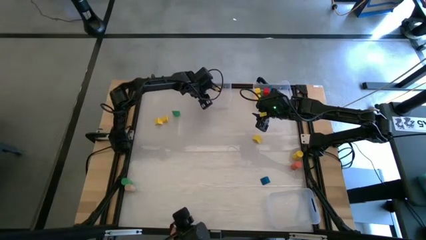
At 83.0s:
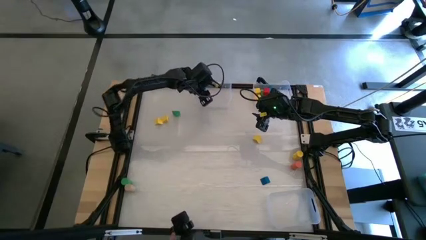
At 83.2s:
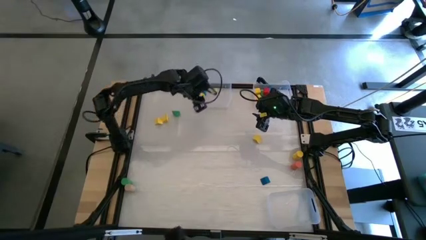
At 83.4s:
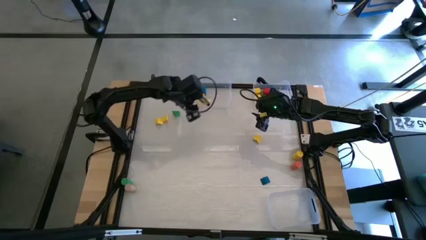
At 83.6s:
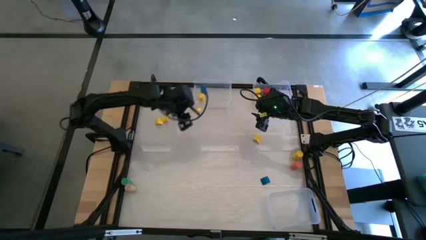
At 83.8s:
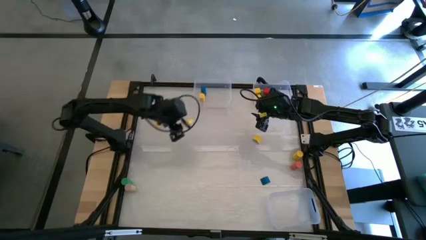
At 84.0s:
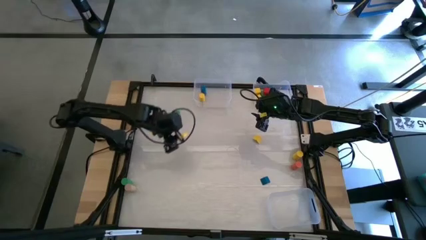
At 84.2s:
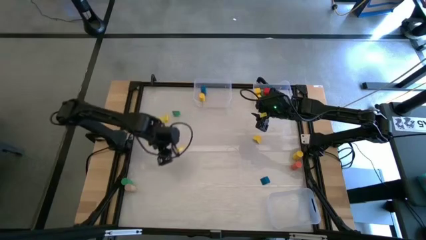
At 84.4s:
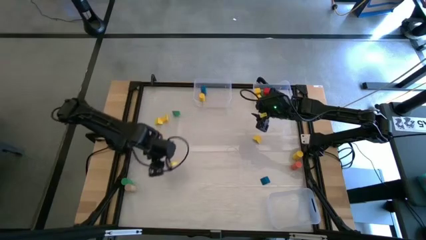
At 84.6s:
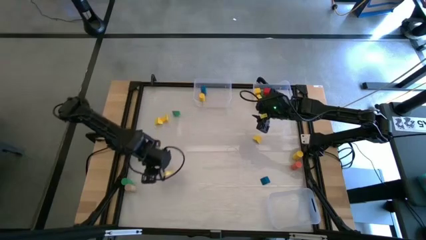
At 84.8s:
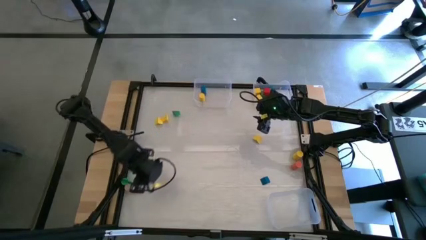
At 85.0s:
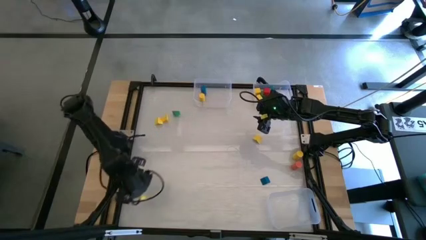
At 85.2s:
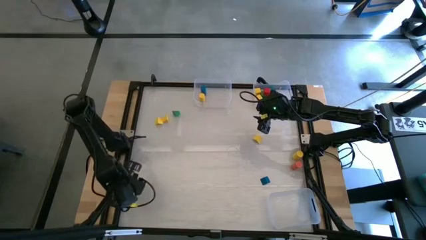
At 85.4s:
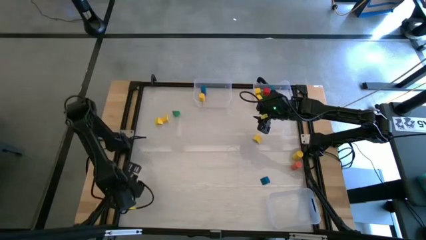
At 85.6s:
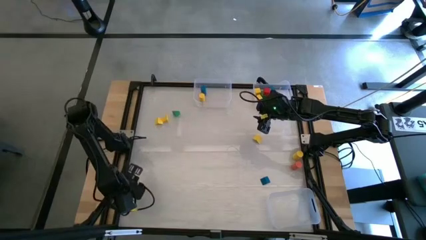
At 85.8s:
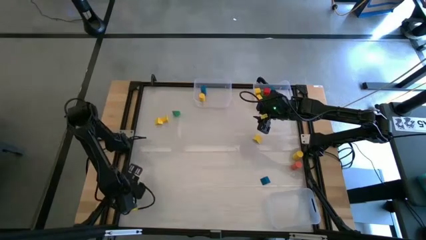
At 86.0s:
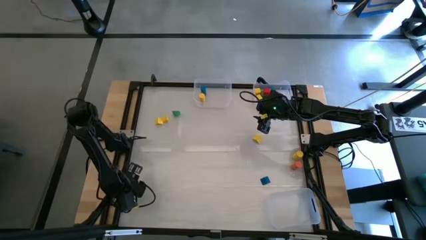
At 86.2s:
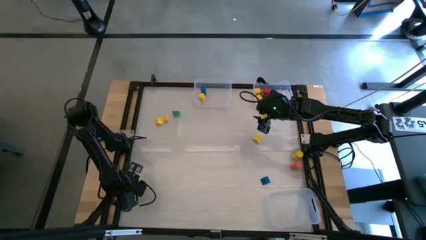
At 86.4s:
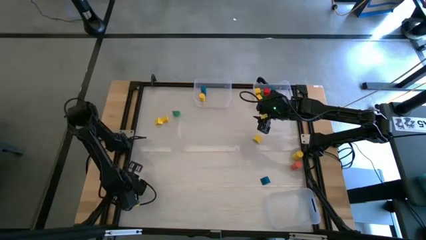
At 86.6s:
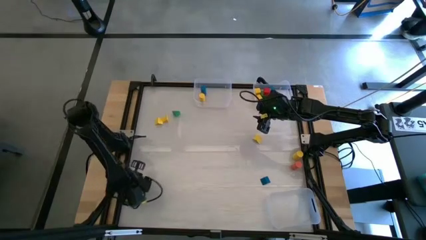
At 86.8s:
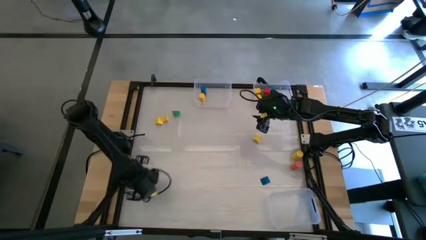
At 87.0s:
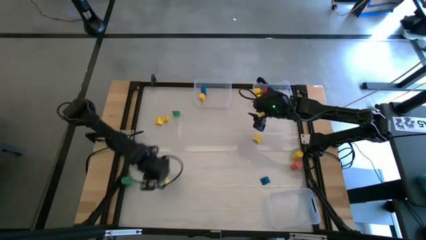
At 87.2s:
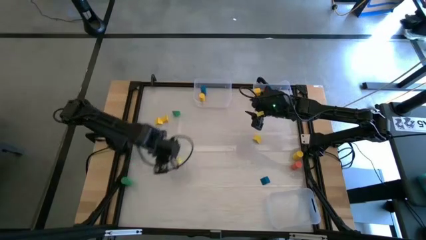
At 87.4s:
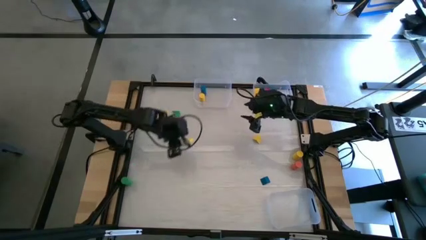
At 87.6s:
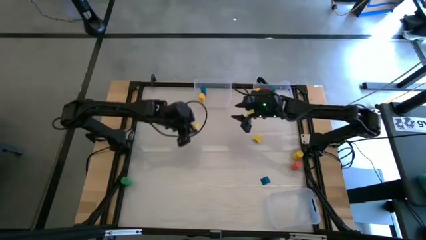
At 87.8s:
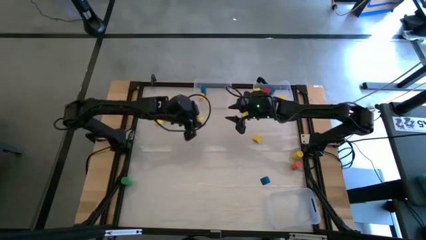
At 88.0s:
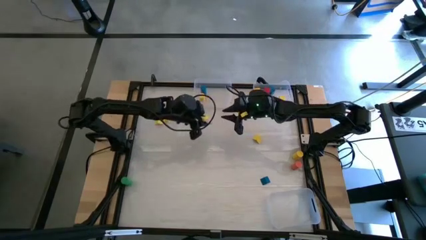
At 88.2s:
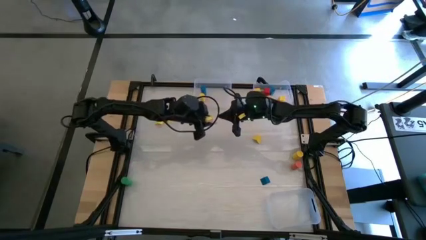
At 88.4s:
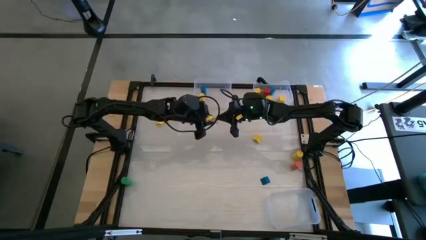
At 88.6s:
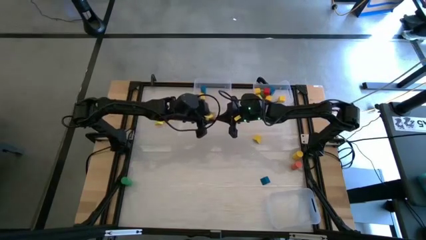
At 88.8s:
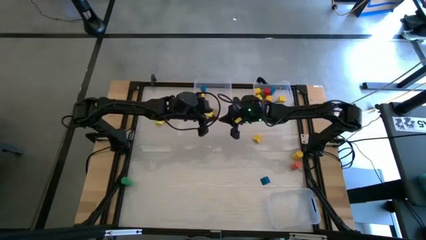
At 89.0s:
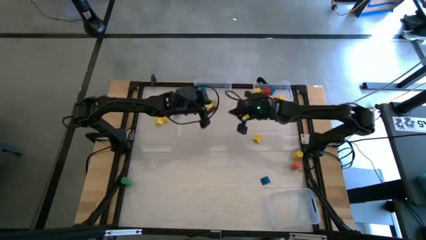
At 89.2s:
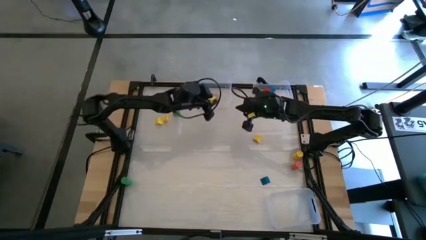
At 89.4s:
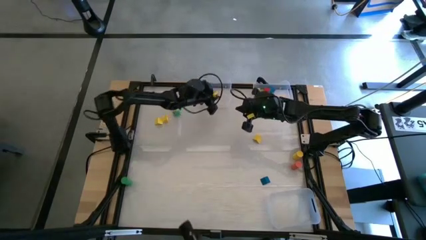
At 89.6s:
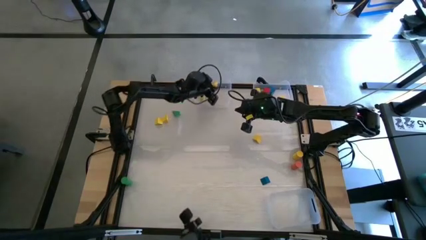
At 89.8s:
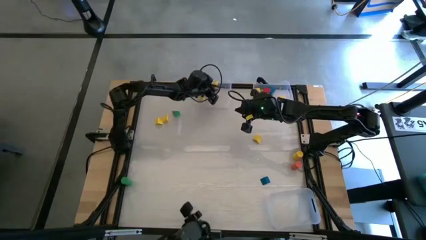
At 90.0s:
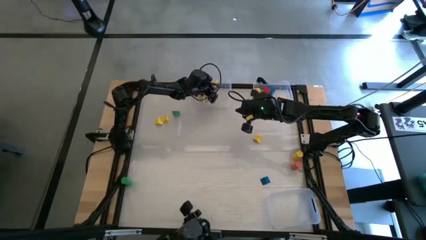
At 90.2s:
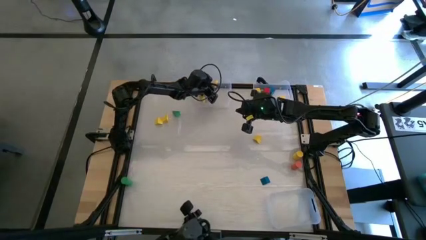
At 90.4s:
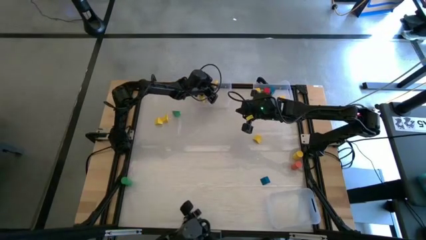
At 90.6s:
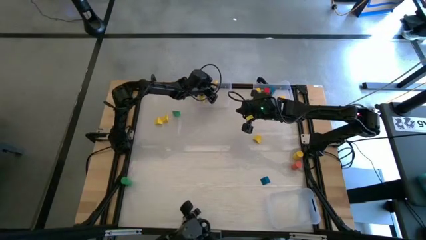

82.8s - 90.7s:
Task: Sort blocks by size
Put the brown cylindrical block into the top left transparent bin

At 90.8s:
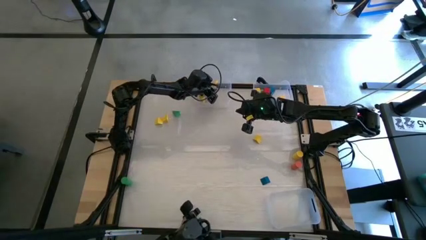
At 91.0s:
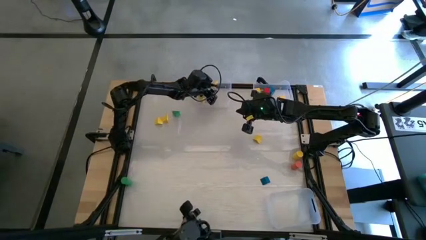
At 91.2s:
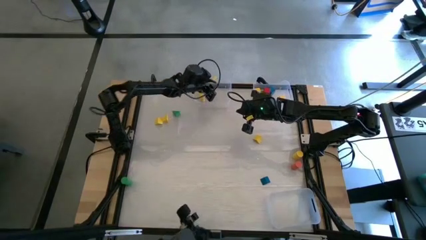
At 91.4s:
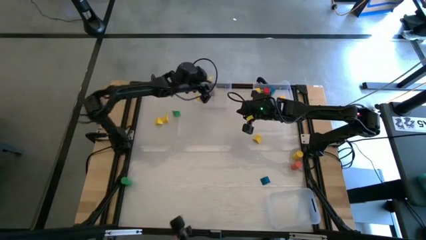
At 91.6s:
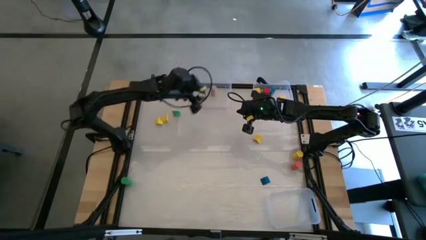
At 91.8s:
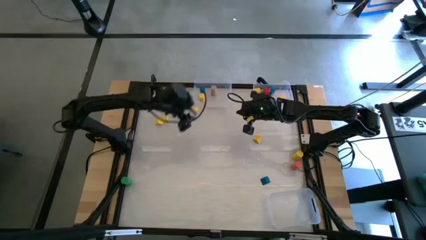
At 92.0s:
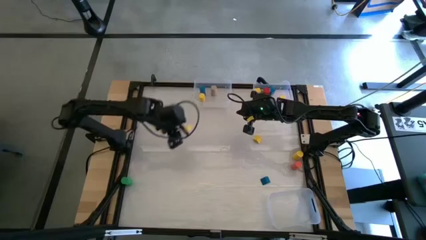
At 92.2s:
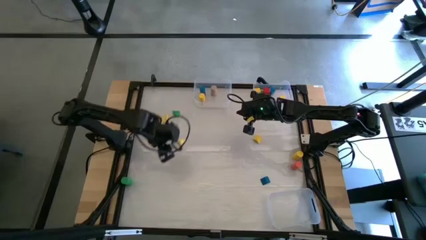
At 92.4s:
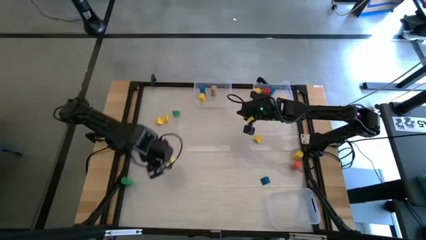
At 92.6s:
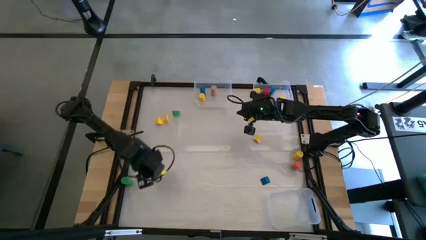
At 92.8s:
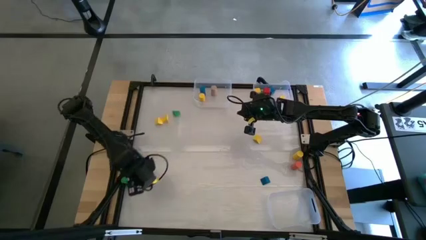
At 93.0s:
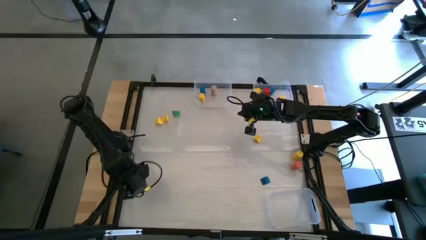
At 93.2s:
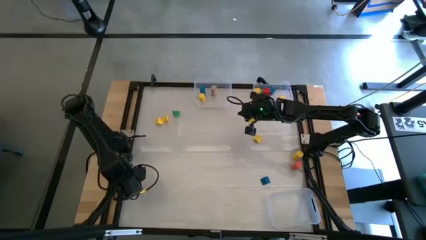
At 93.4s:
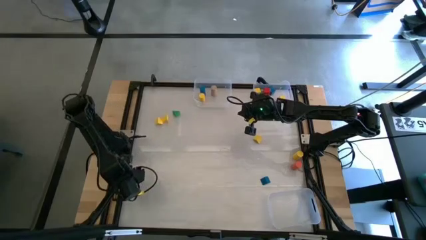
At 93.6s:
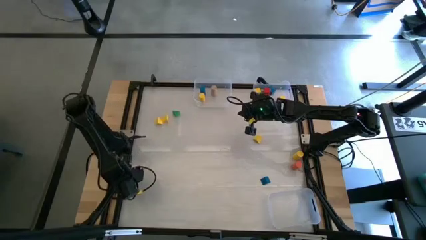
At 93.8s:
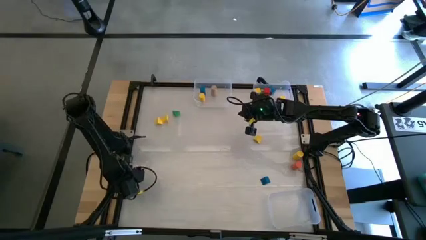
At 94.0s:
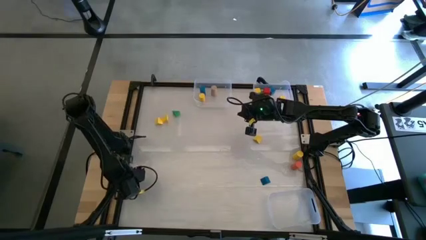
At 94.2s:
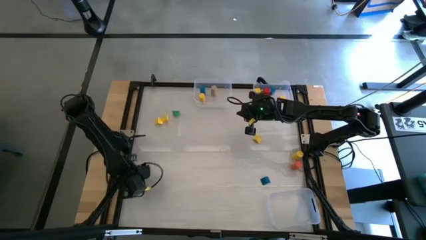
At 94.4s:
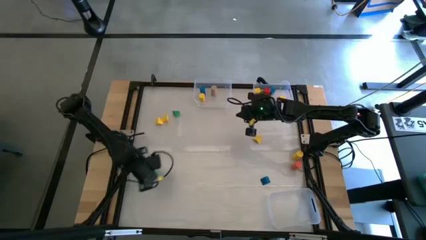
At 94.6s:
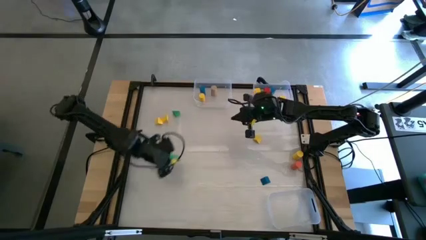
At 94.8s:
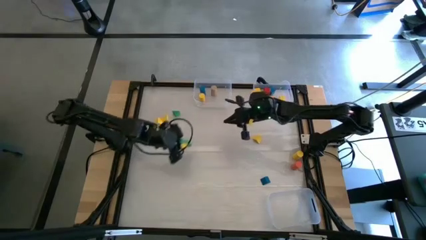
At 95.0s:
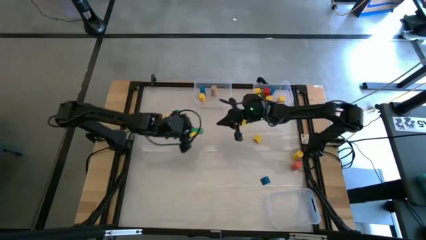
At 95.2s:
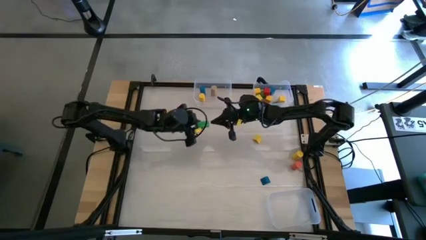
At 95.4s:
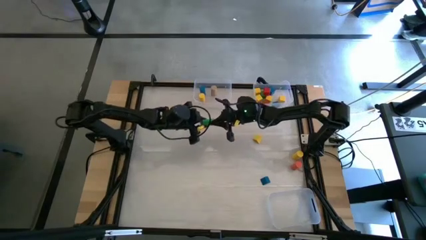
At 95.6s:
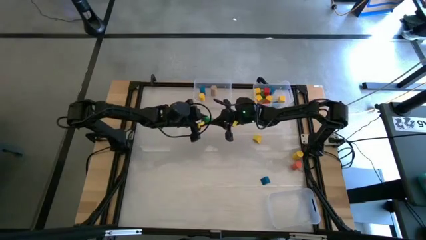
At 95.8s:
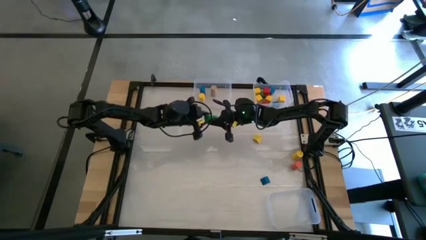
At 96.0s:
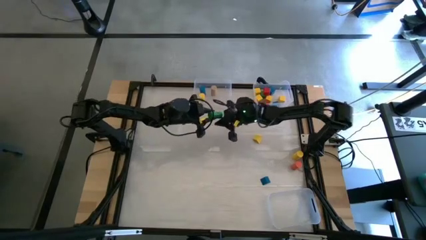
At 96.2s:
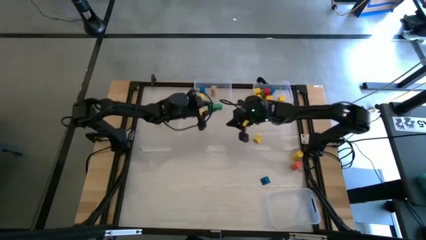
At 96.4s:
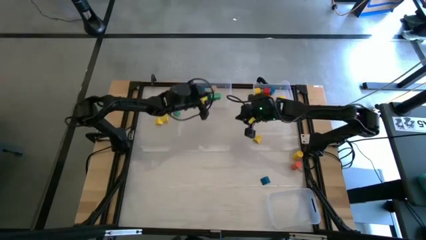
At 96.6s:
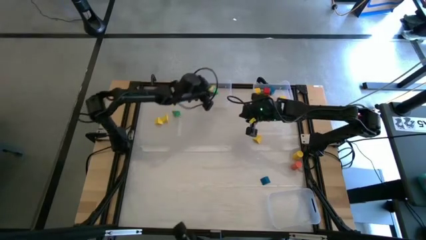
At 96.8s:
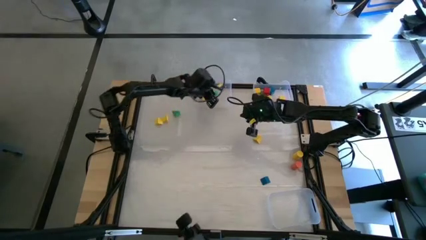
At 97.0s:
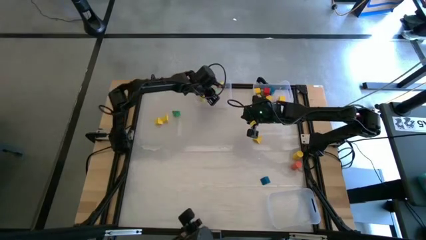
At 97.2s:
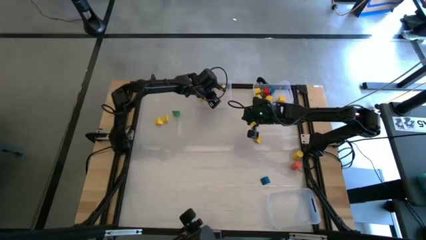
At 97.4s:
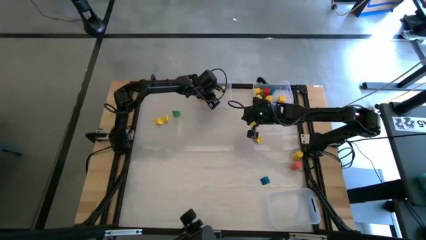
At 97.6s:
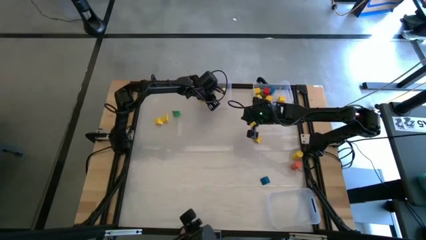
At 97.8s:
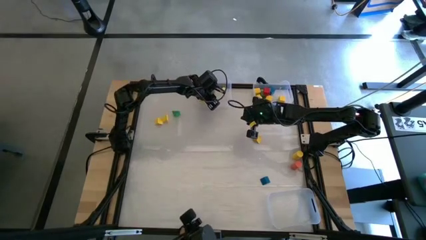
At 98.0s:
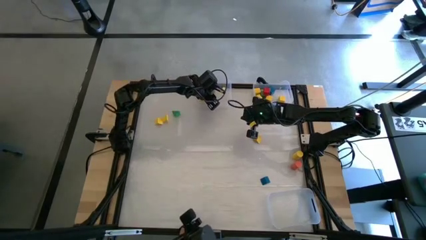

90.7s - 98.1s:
Put the green cylindrical block into the top left transparent bin
